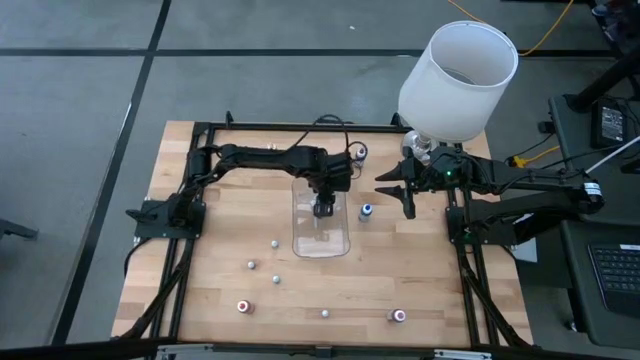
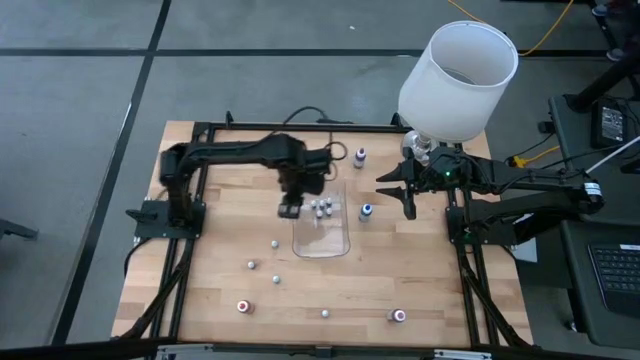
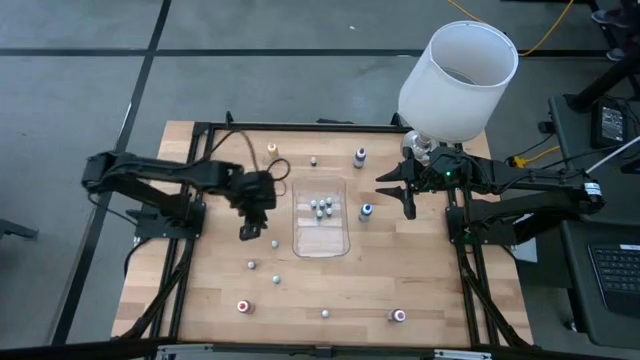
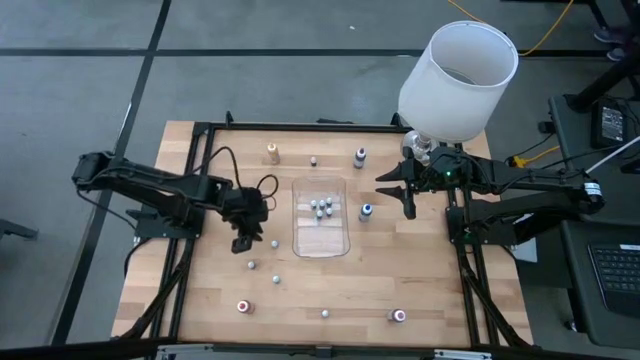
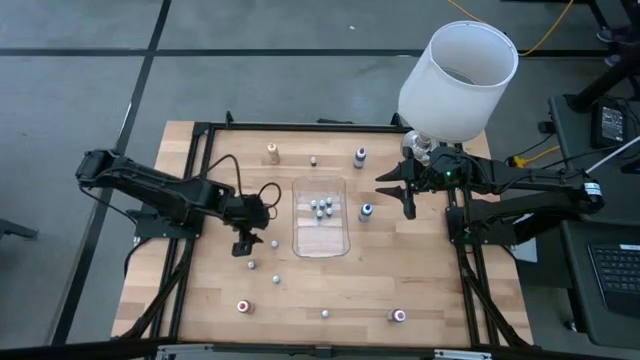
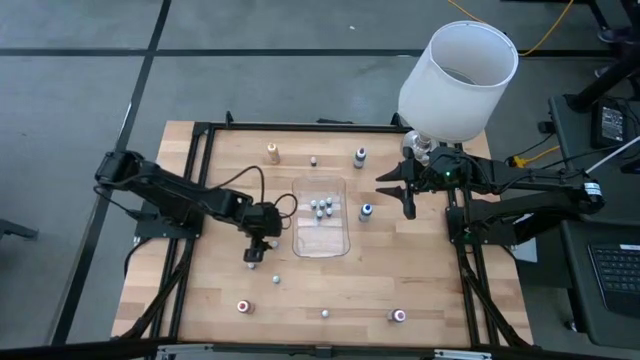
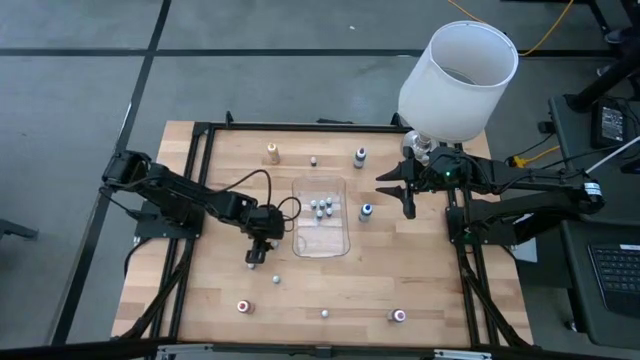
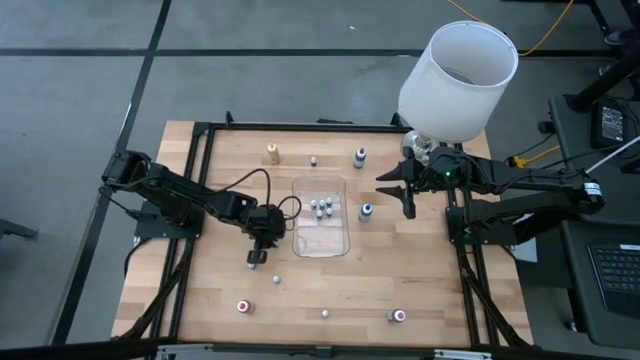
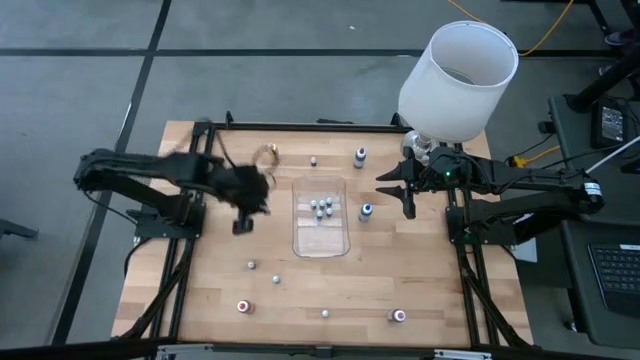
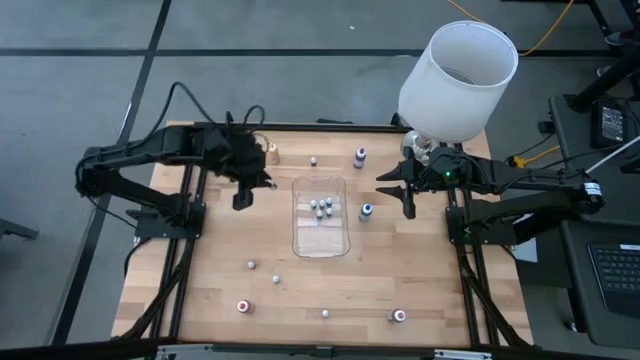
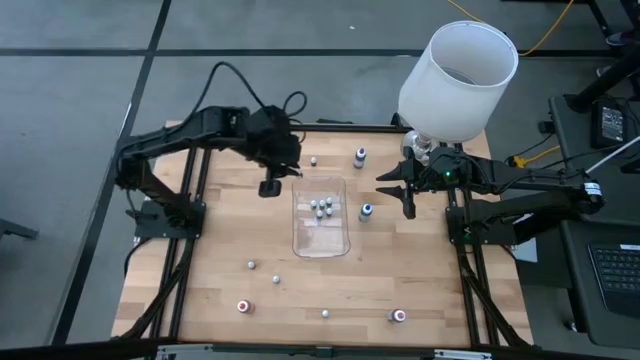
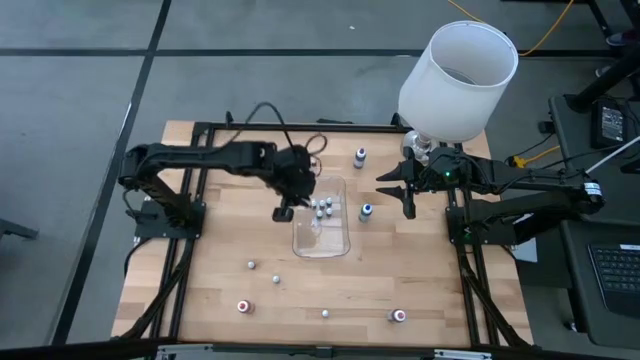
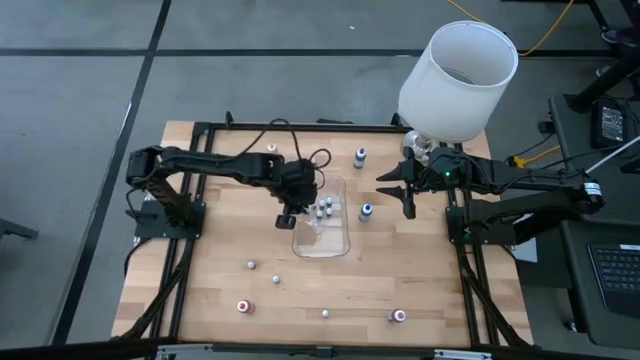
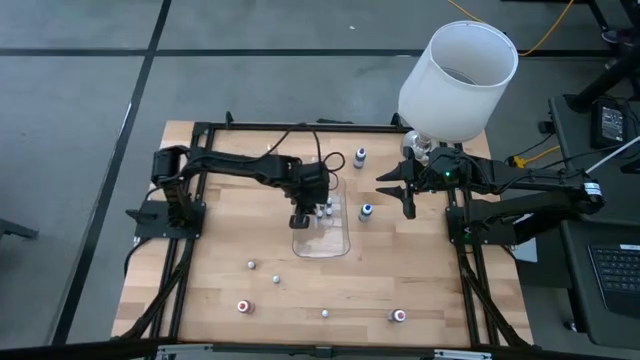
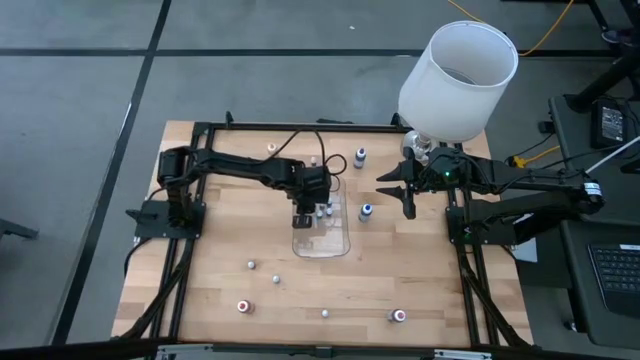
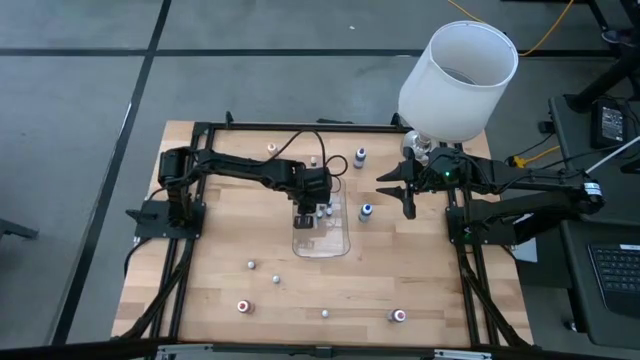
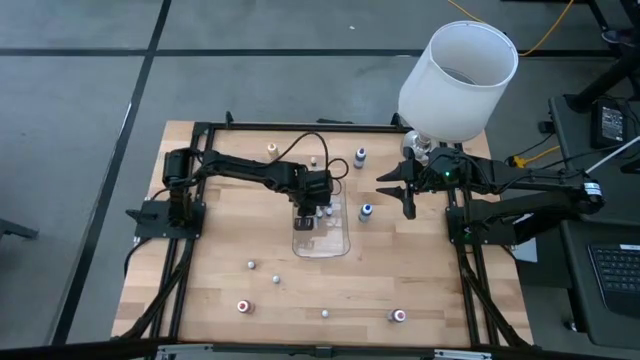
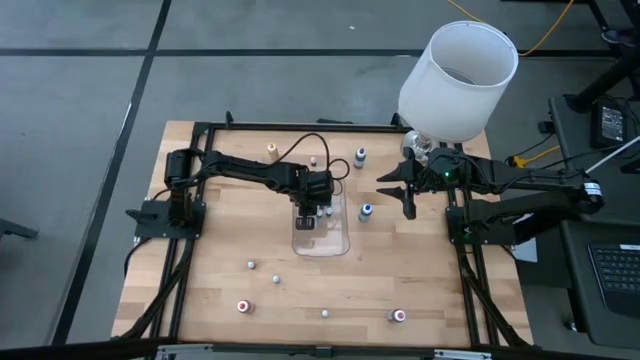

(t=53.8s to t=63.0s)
Task: Pick & Place food coloring
Put the small blue food coloring into the transparent bin

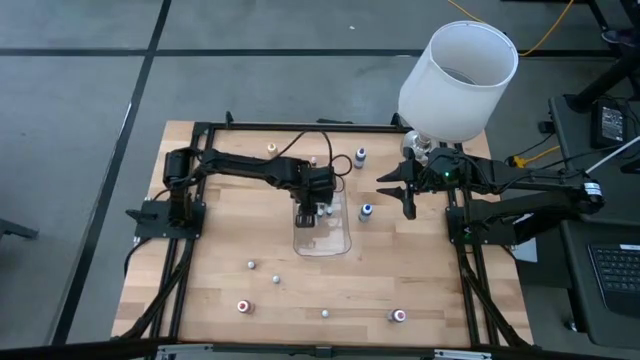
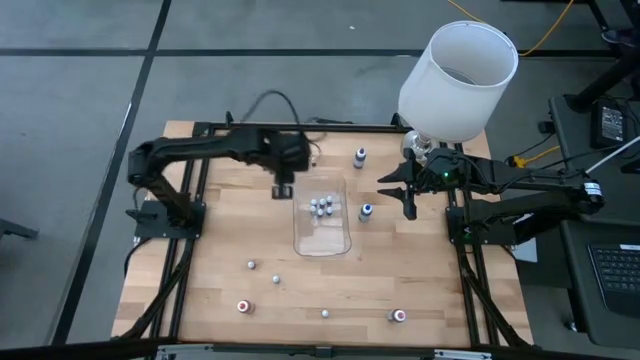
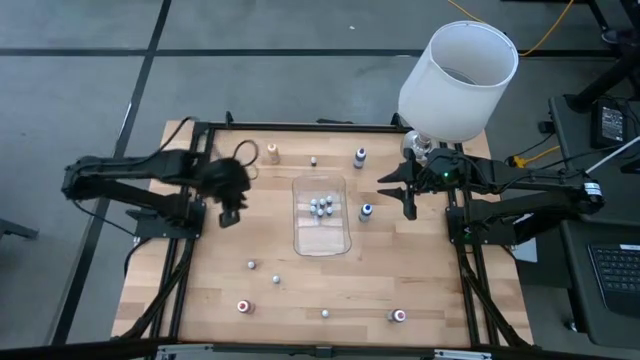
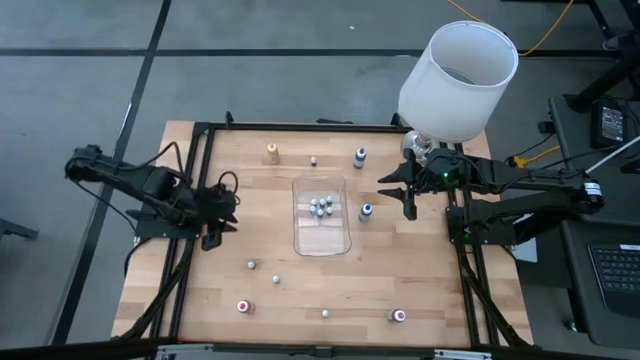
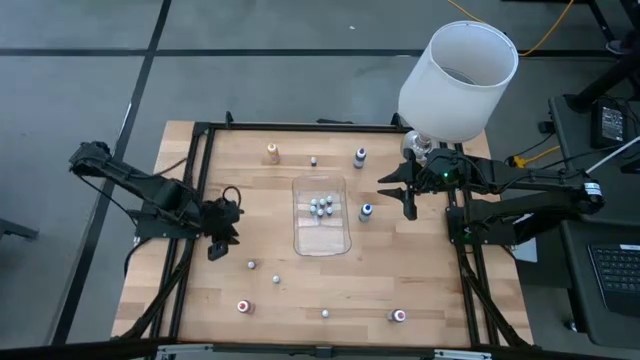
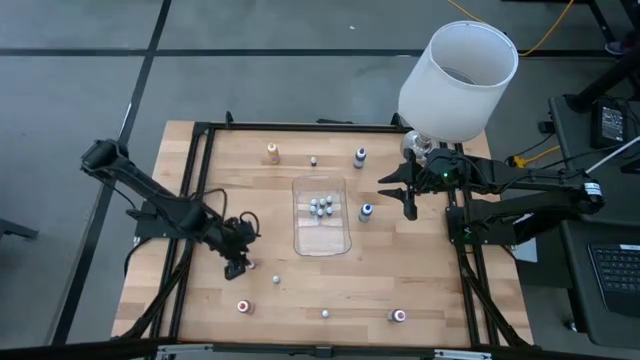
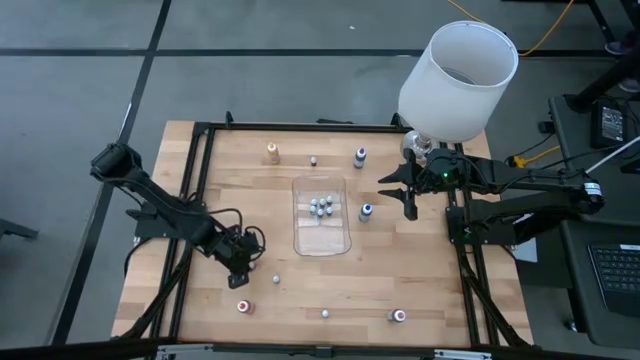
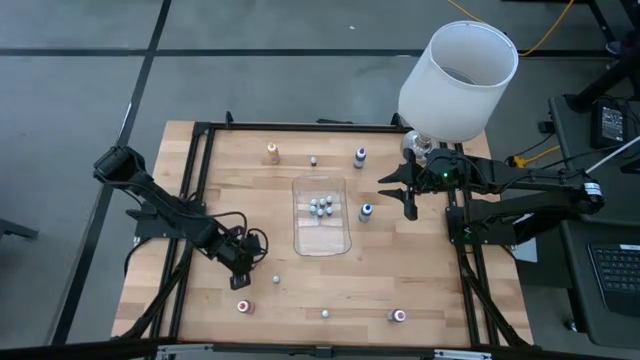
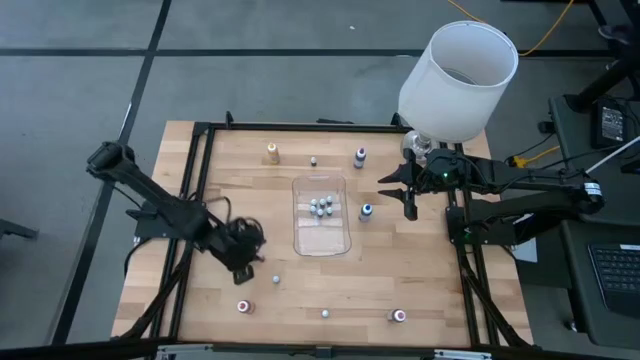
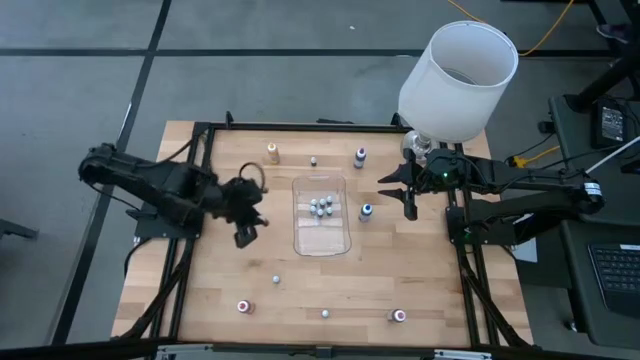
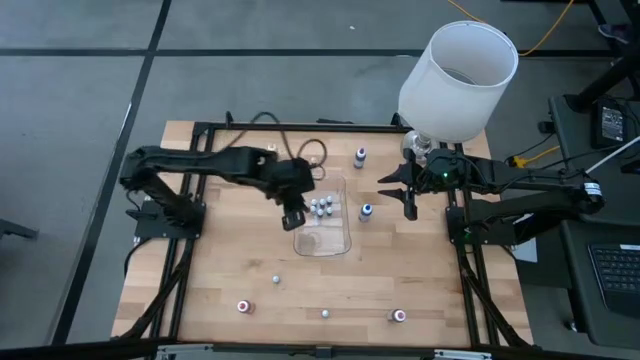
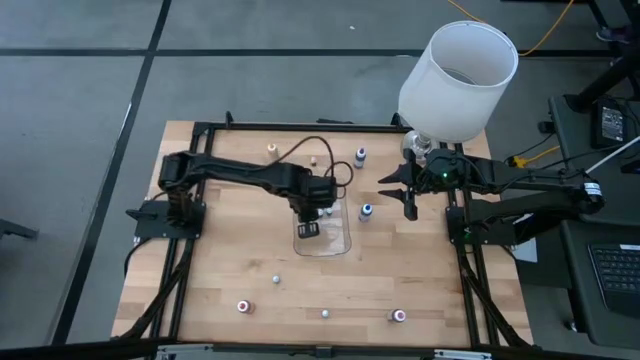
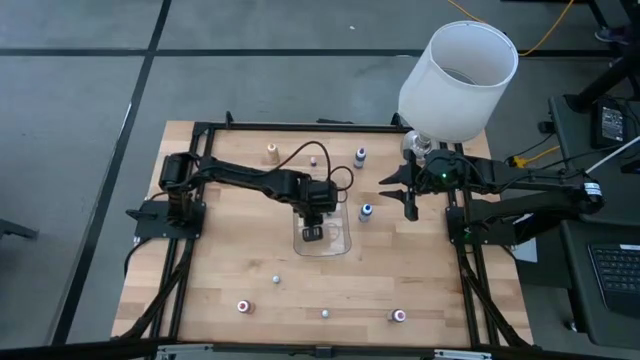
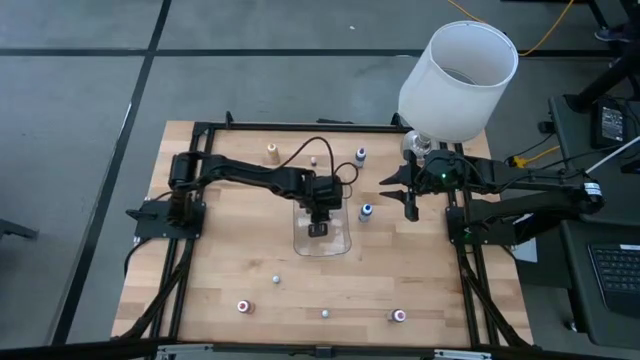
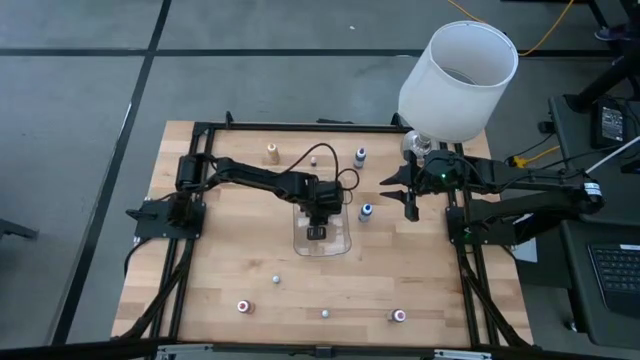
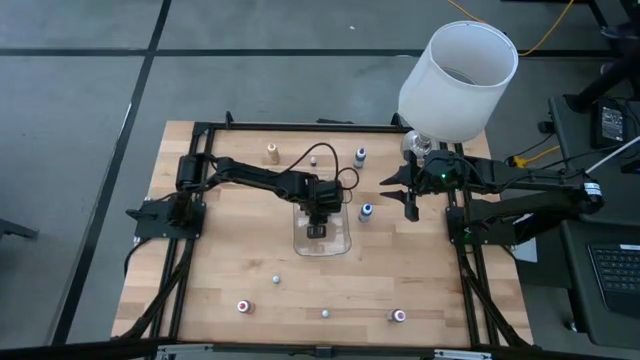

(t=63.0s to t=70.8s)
Put the small red food coloring into the transparent bin

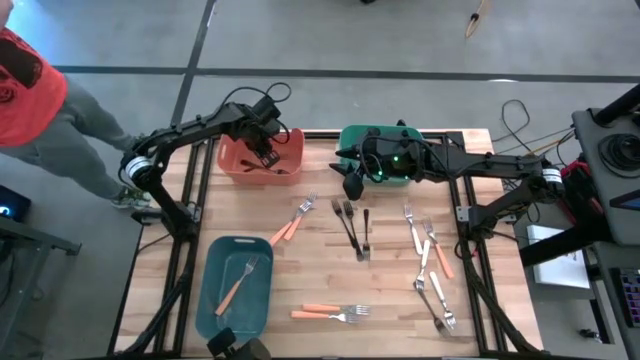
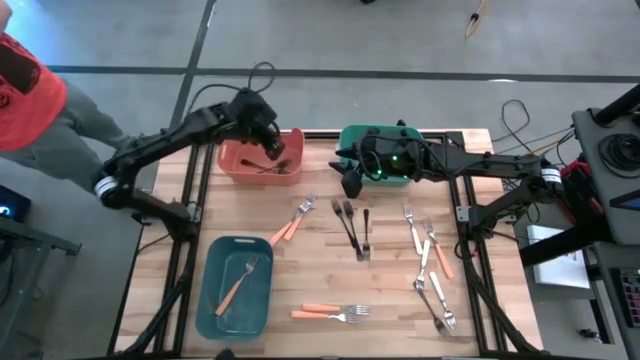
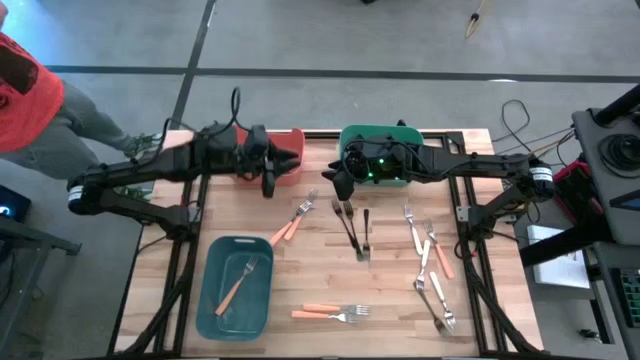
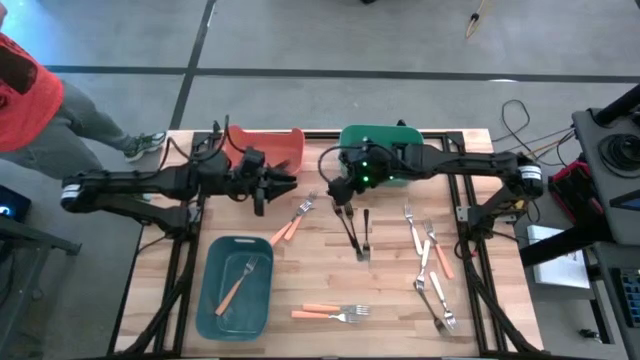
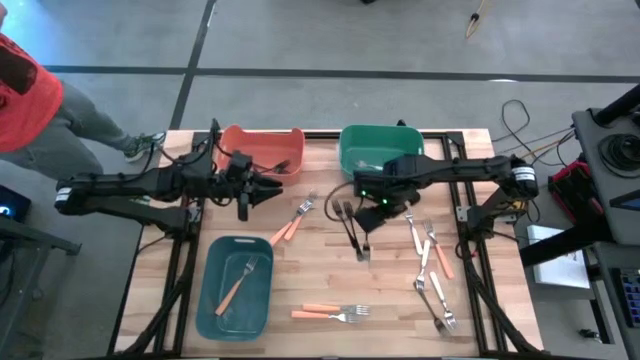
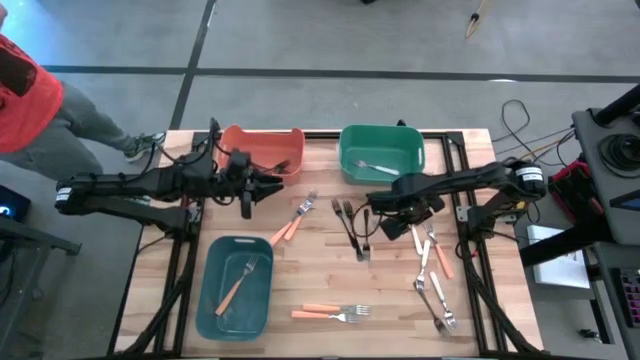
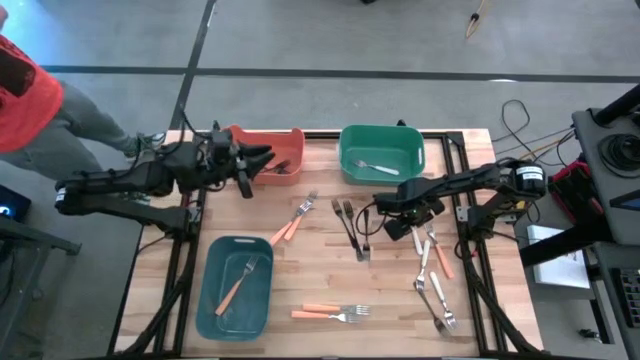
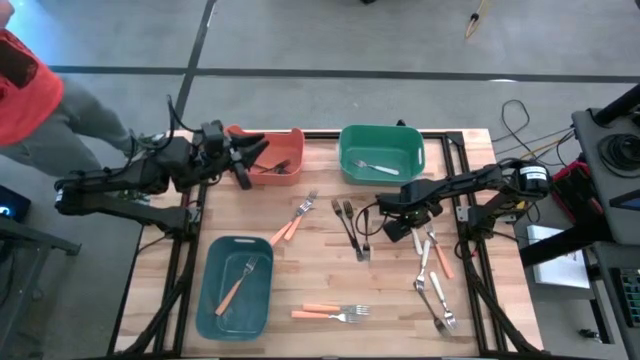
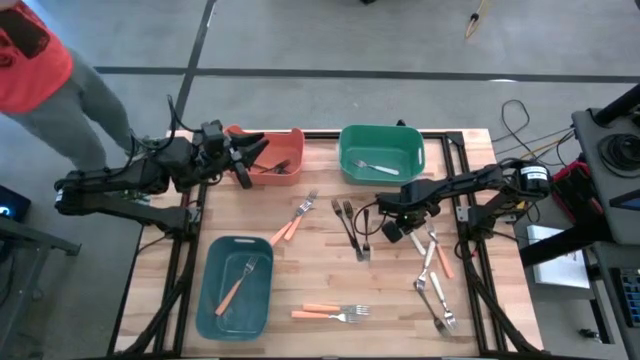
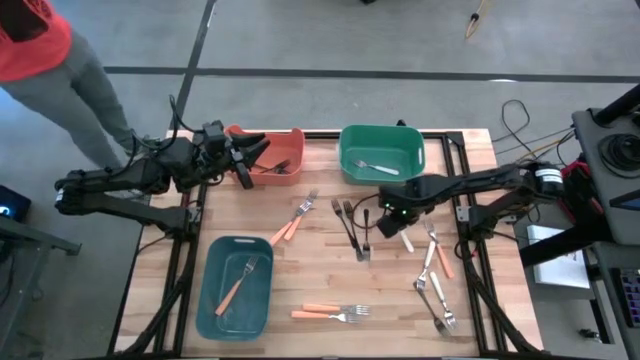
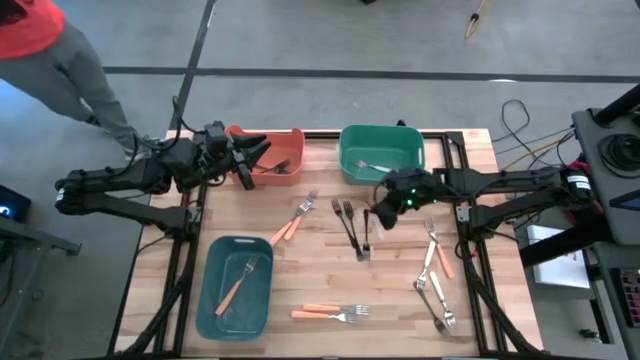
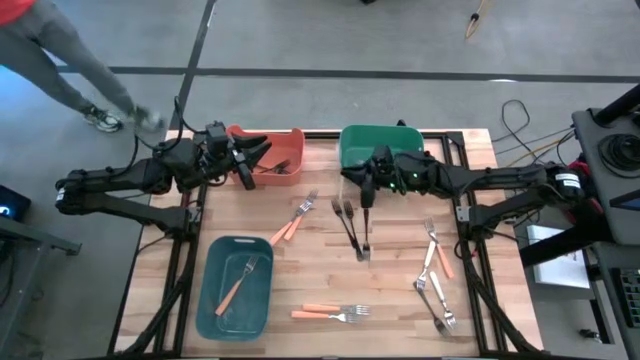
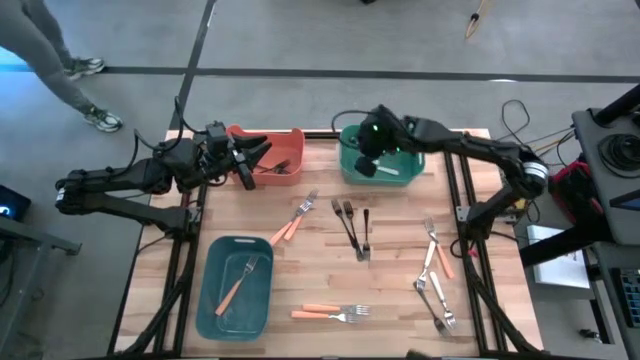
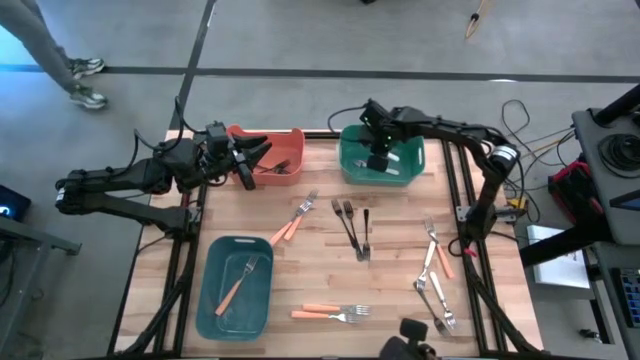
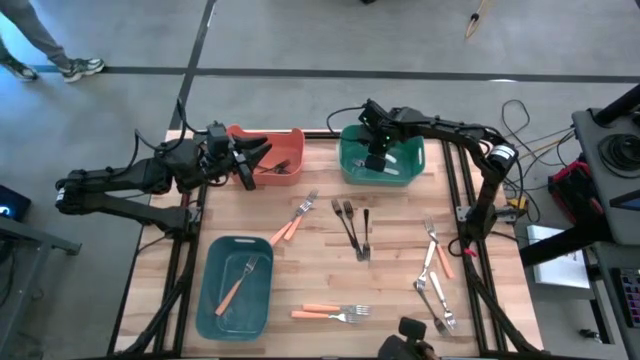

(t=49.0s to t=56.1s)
Task: Sort silverware by color (type)
Put the white fork into the green bin
